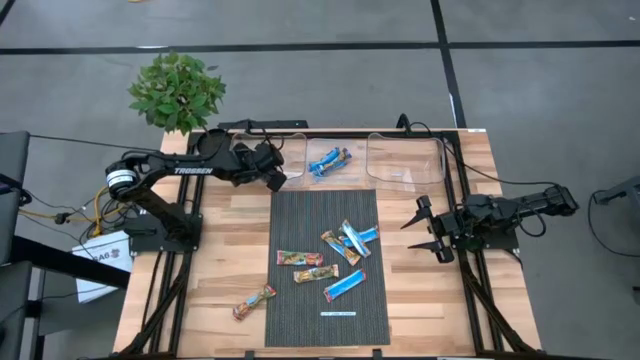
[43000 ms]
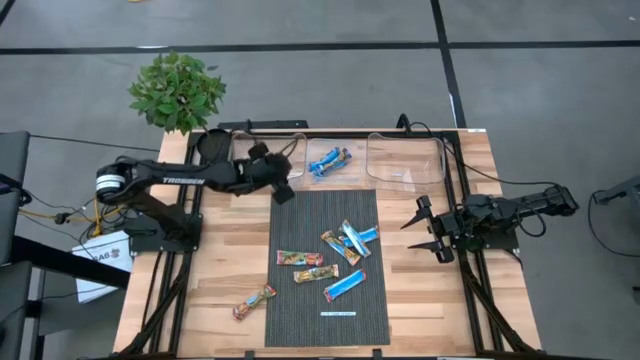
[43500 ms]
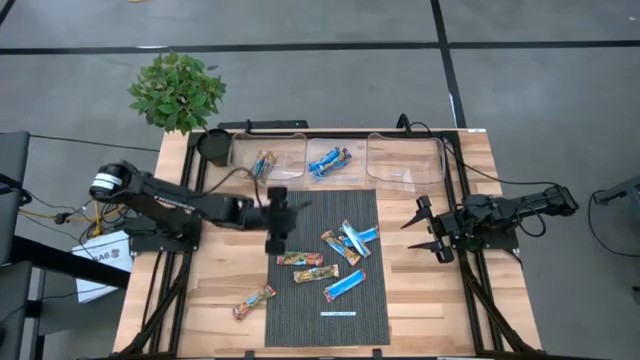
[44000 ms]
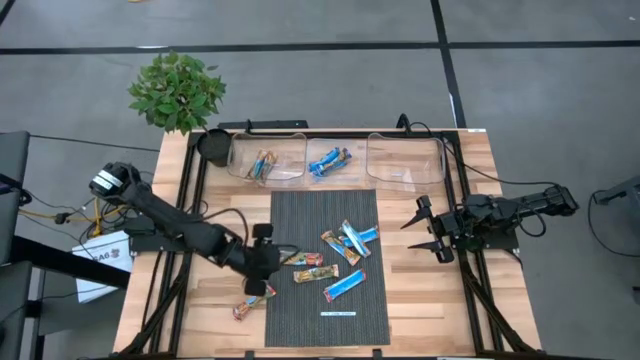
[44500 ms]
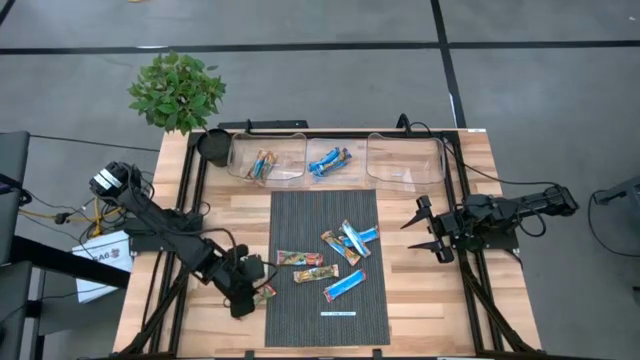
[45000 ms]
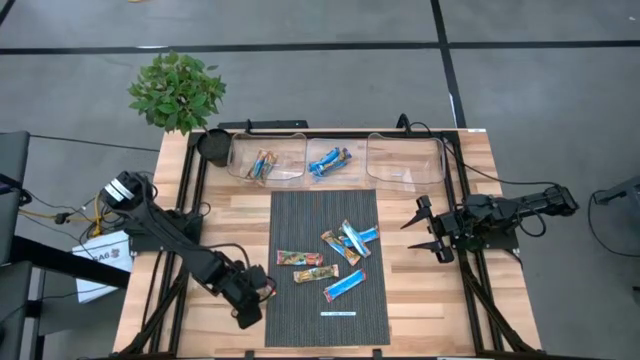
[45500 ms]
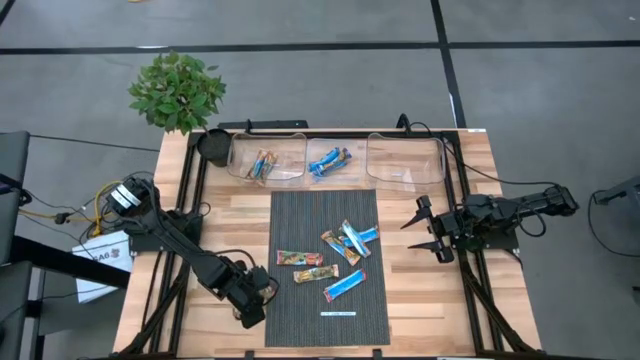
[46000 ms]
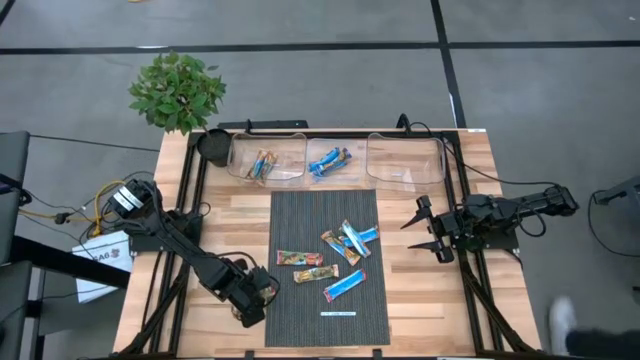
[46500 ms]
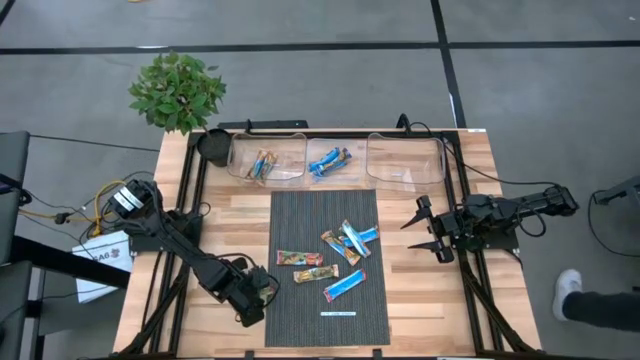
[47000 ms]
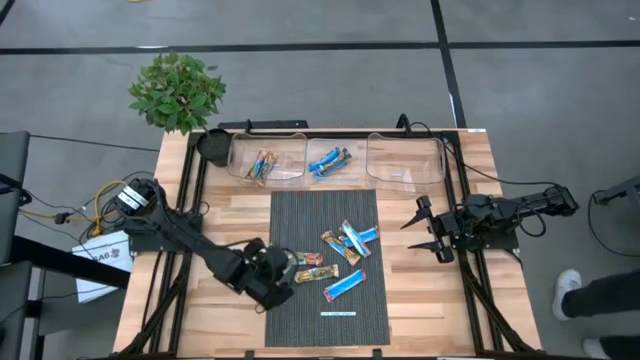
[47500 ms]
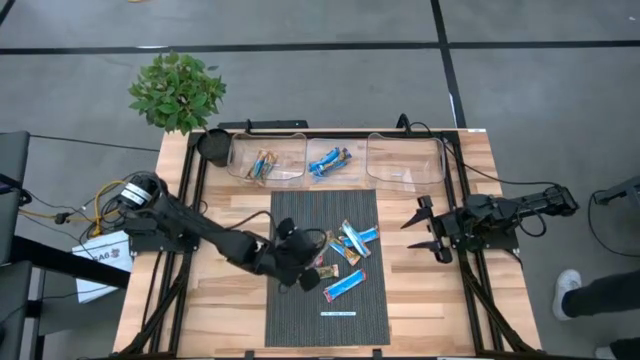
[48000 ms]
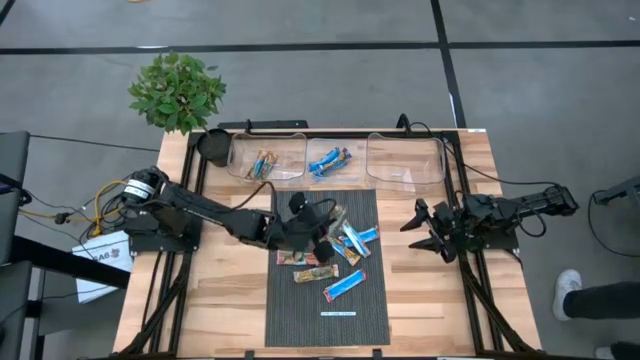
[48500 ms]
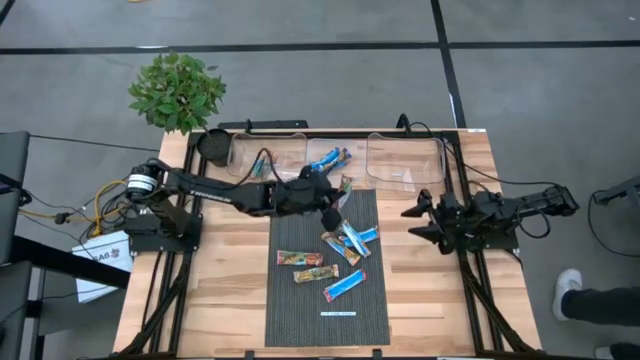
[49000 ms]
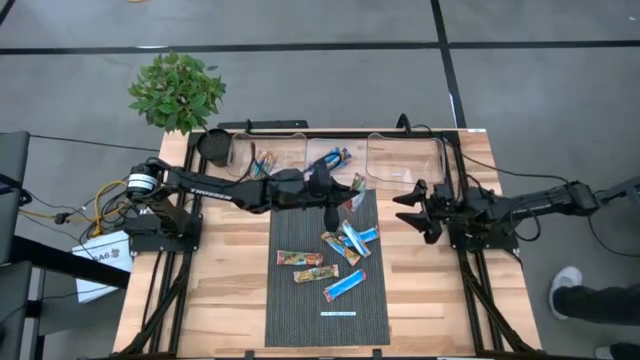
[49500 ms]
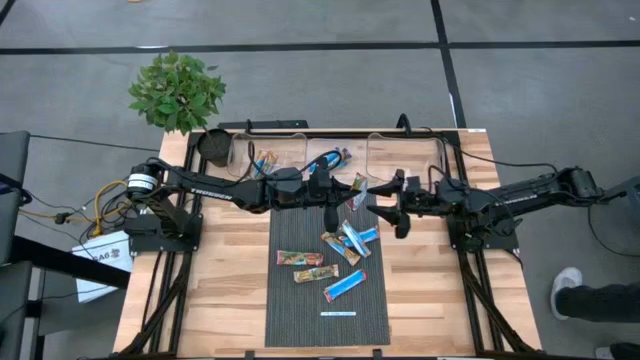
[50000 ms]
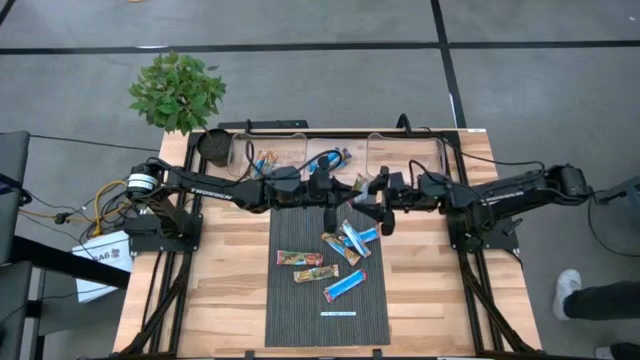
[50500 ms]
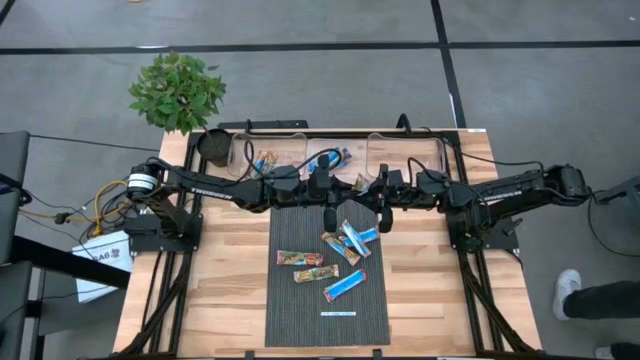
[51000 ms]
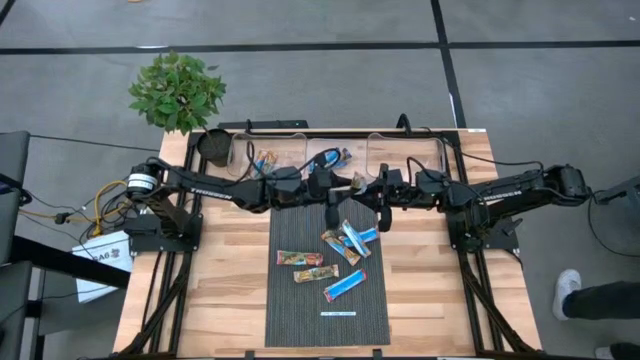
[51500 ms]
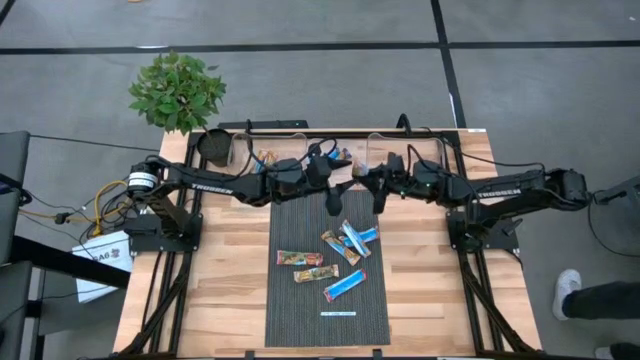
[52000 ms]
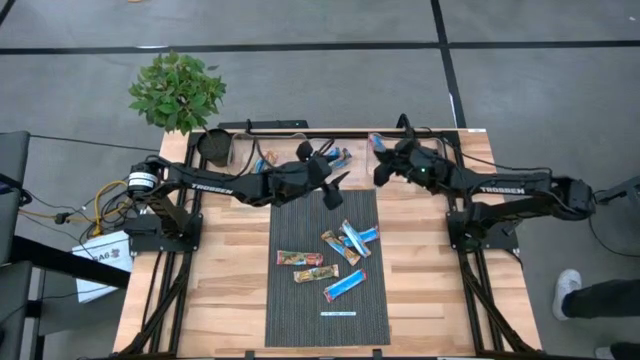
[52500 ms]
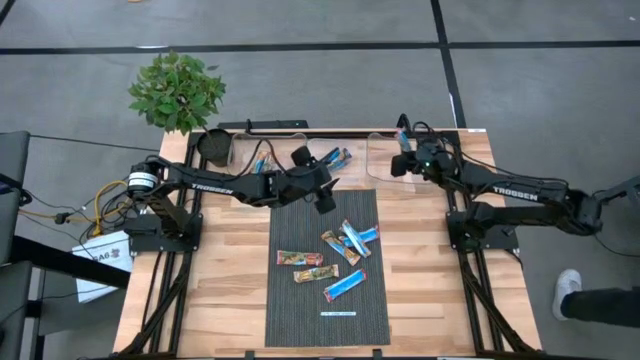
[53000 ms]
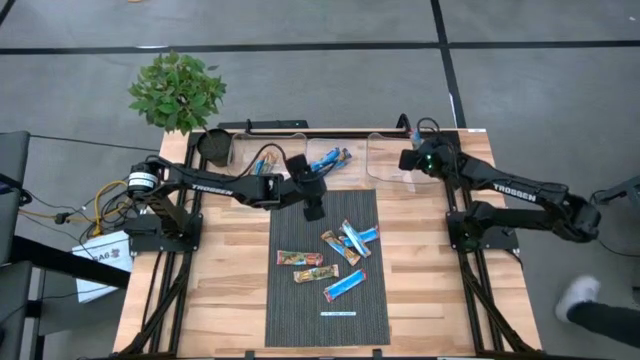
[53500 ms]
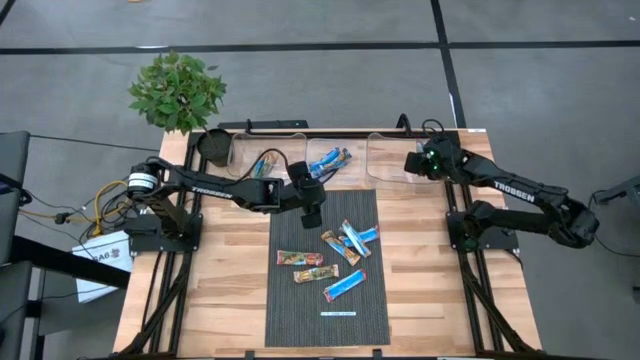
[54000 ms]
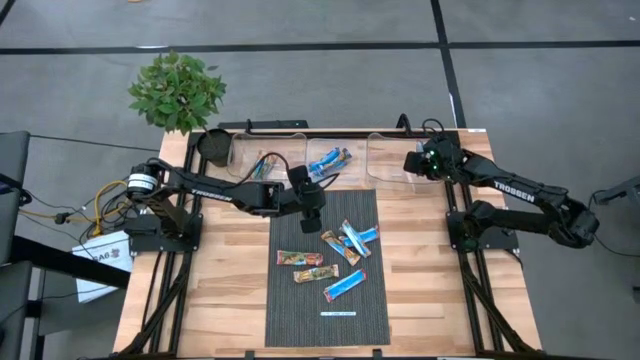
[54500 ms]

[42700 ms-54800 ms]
Task: Pick and place Granola Bars by type
Put the red granola bar into the right transparent bin

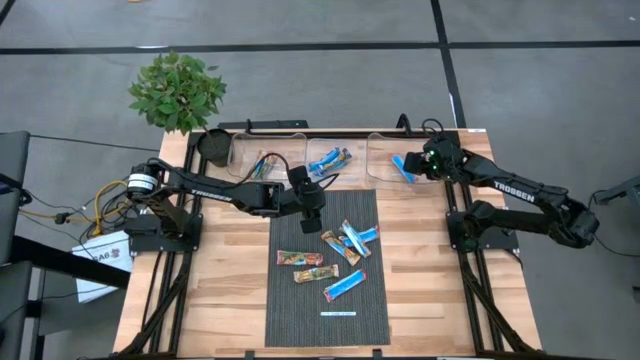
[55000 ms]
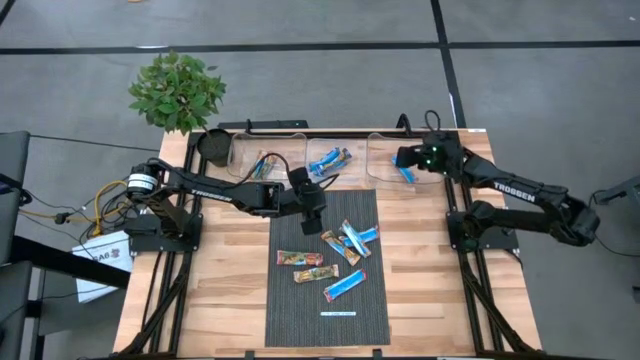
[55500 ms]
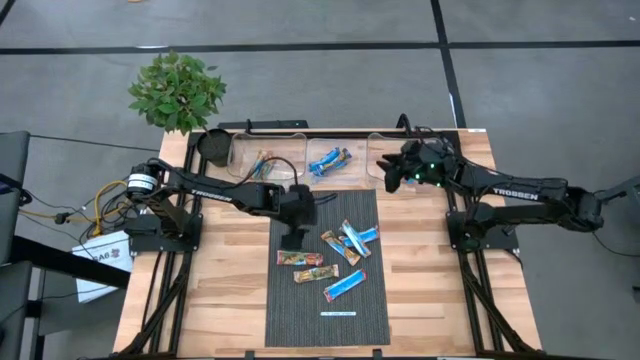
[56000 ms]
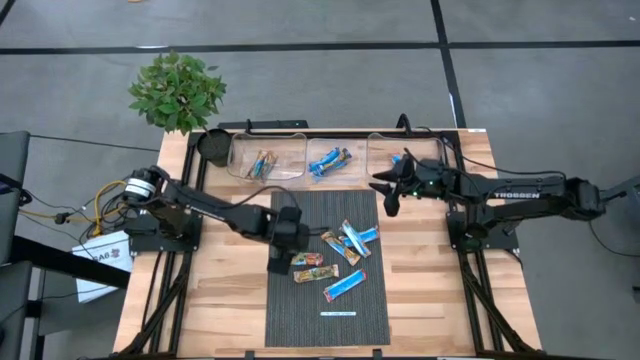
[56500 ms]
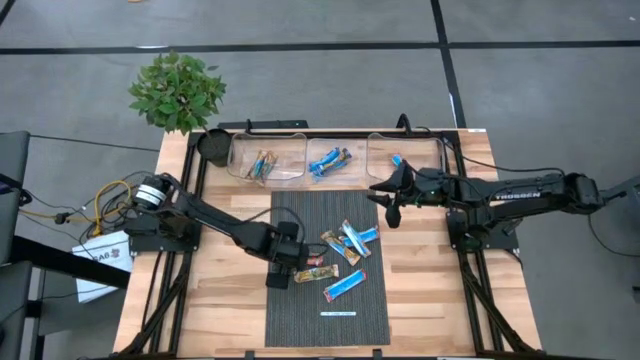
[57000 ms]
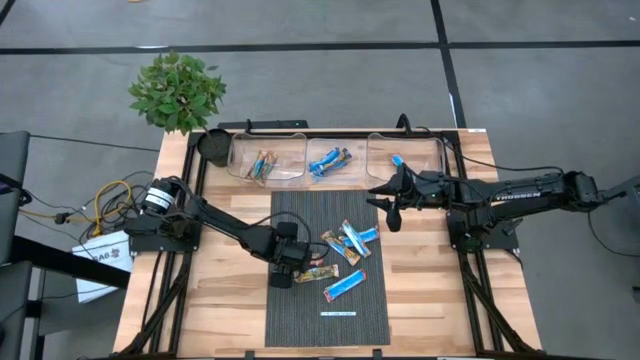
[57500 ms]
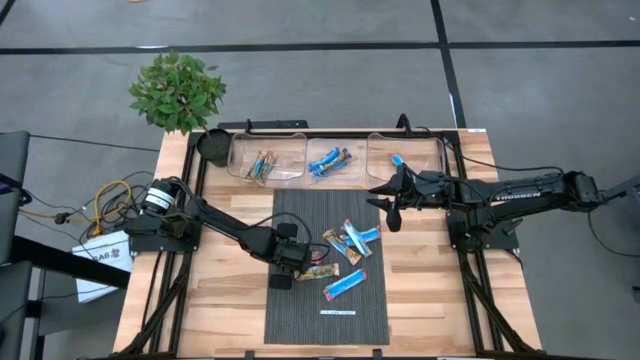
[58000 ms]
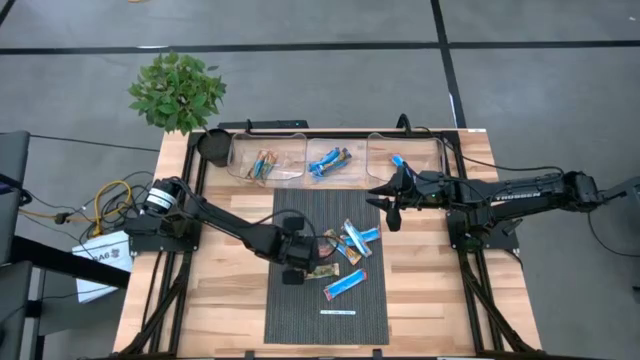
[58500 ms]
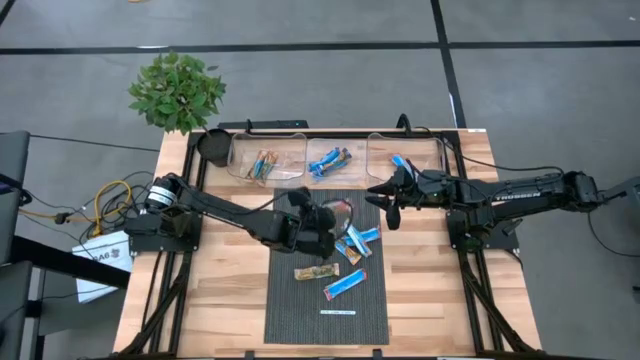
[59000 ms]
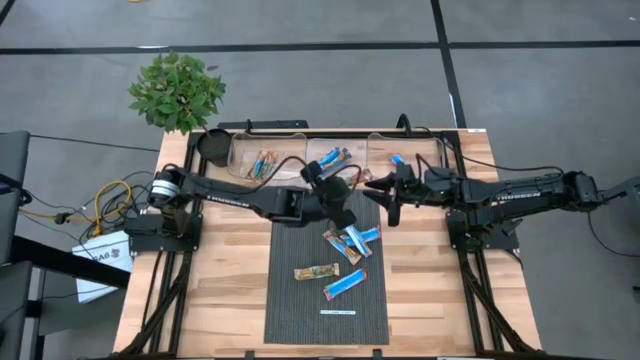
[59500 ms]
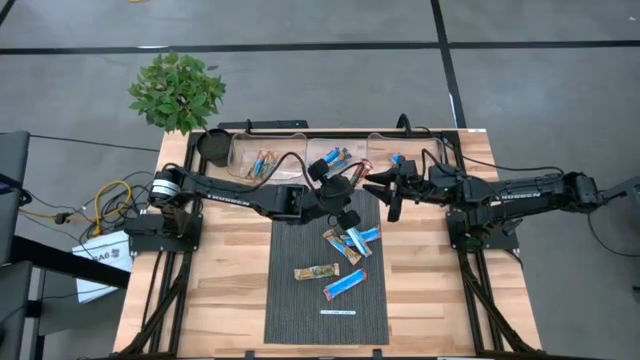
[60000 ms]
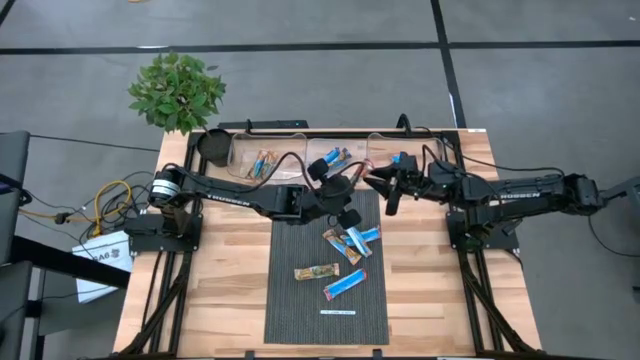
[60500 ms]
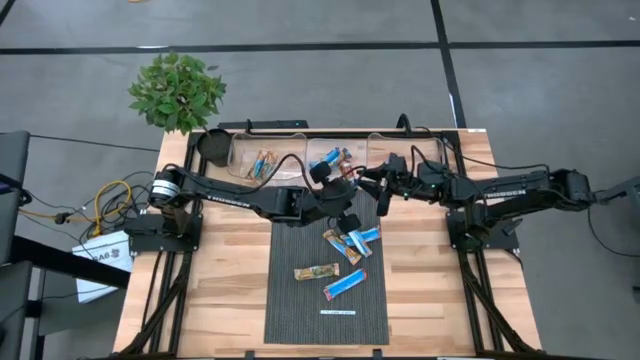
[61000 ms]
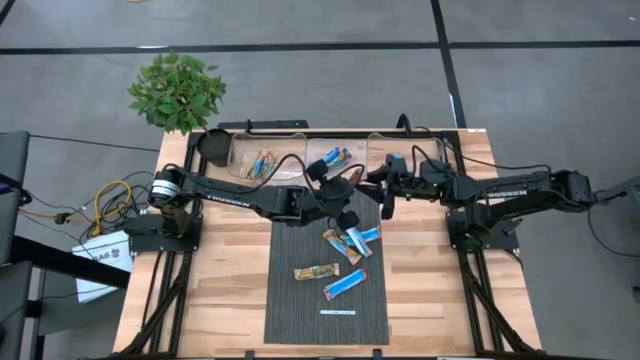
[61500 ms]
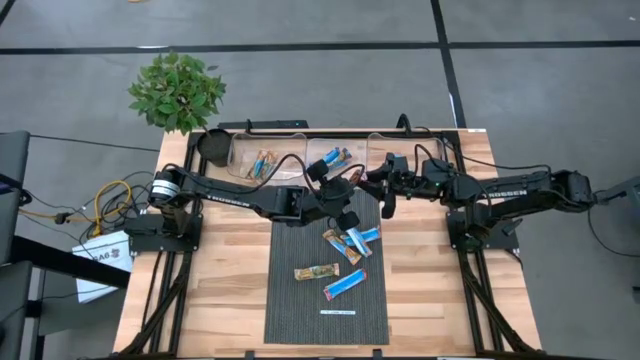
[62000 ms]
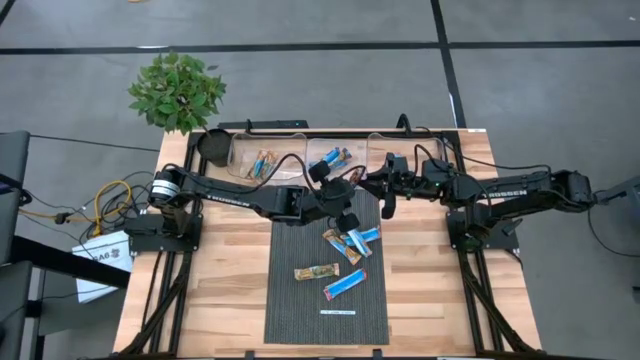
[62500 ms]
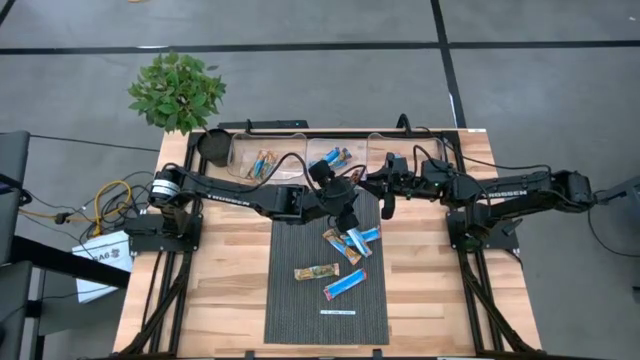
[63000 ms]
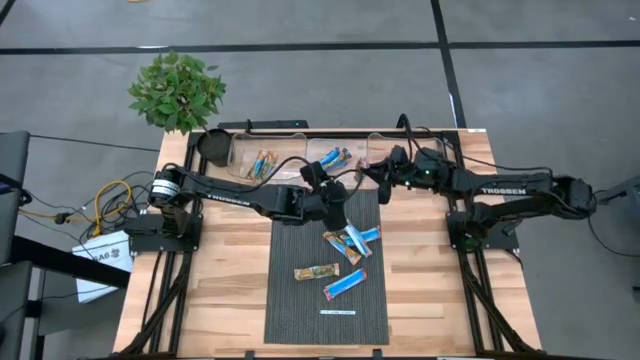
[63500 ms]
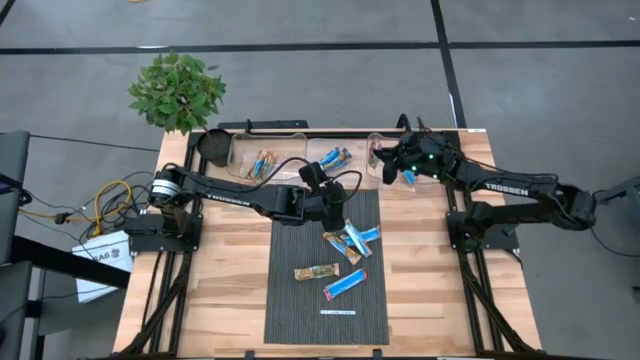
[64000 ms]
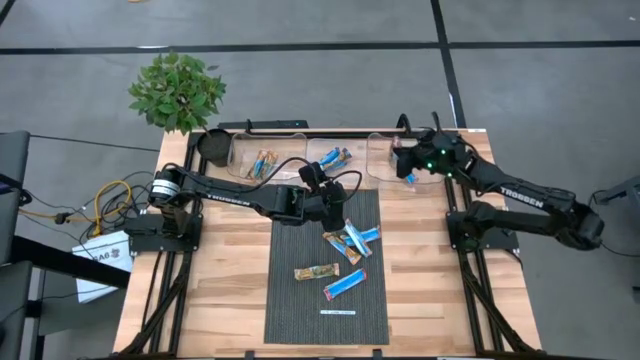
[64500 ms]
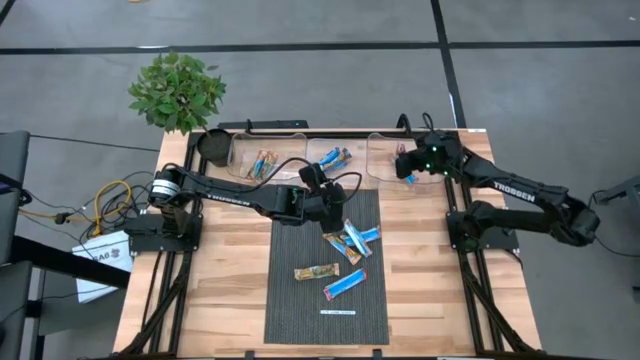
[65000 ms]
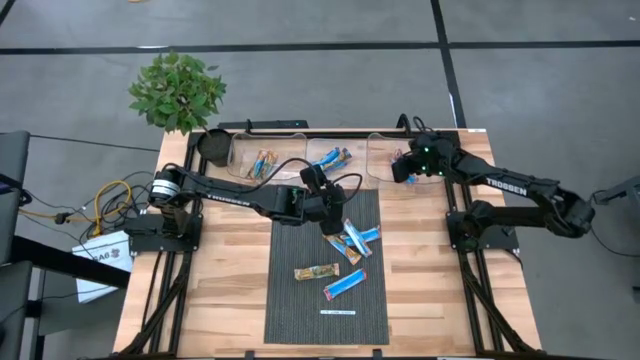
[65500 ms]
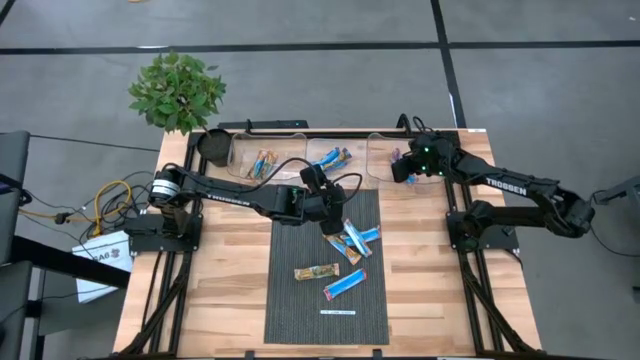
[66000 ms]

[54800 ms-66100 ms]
Put the red granola bar into the right transparent bin
